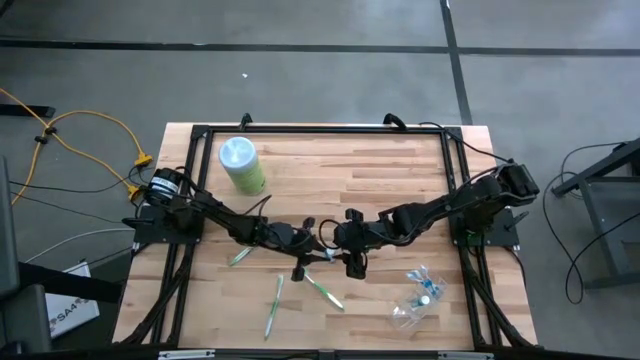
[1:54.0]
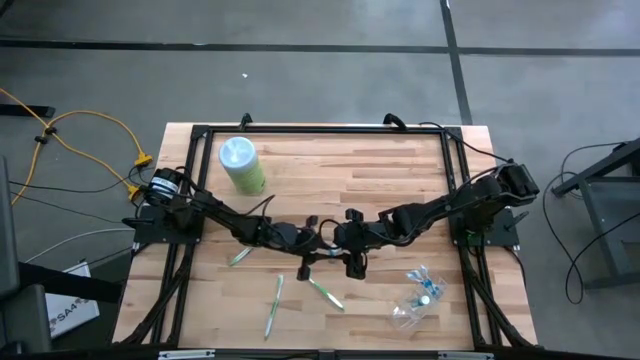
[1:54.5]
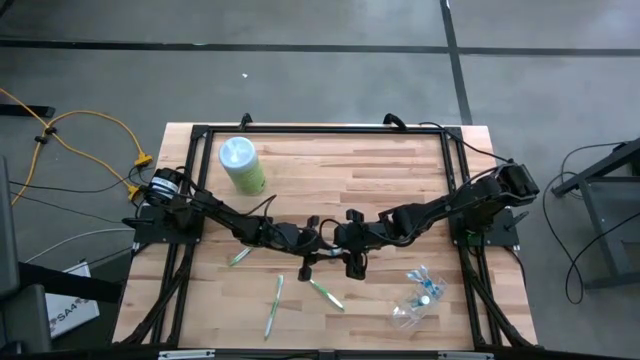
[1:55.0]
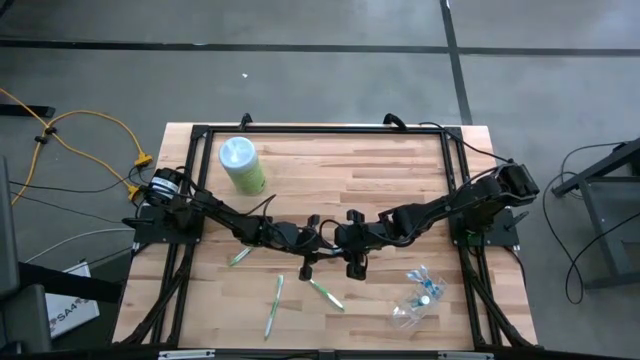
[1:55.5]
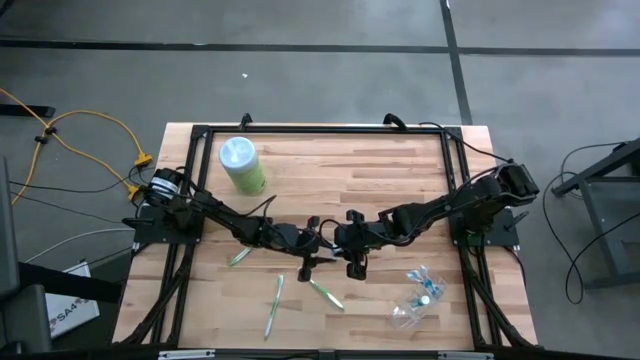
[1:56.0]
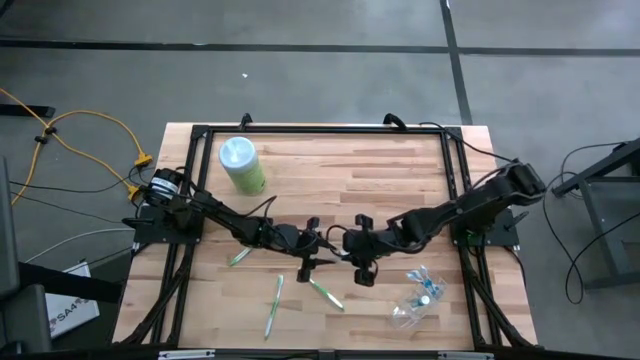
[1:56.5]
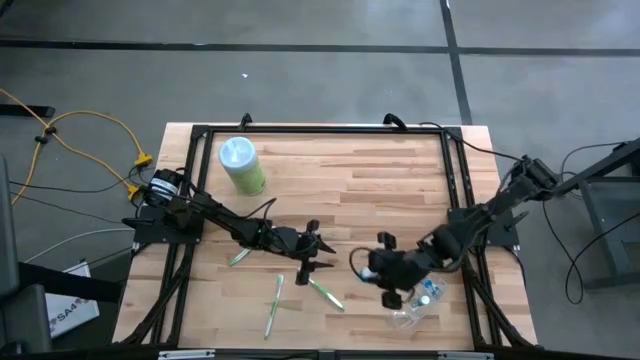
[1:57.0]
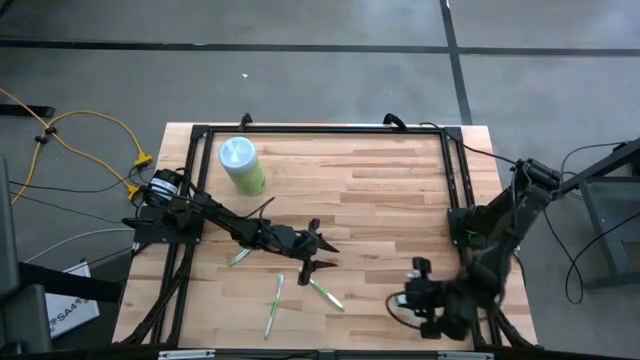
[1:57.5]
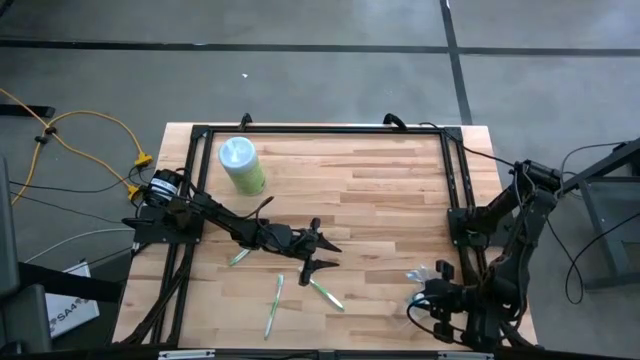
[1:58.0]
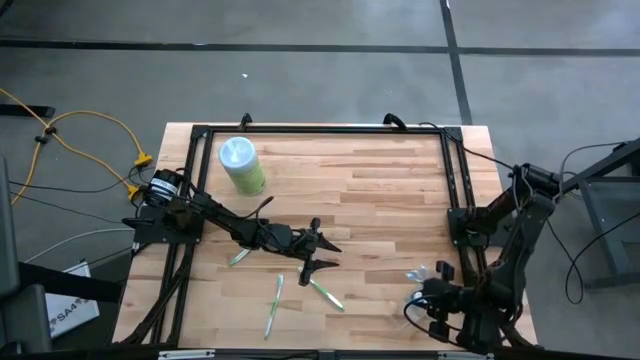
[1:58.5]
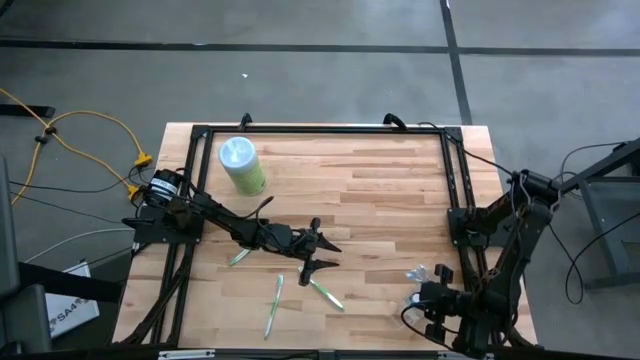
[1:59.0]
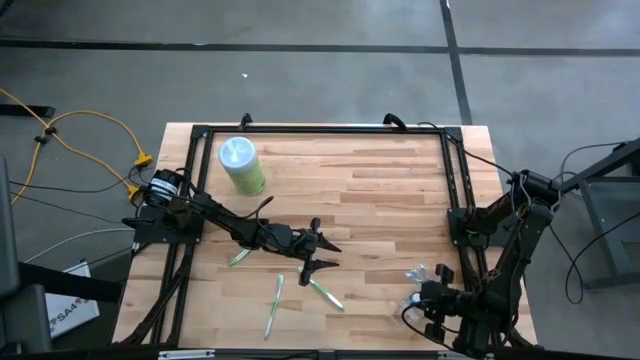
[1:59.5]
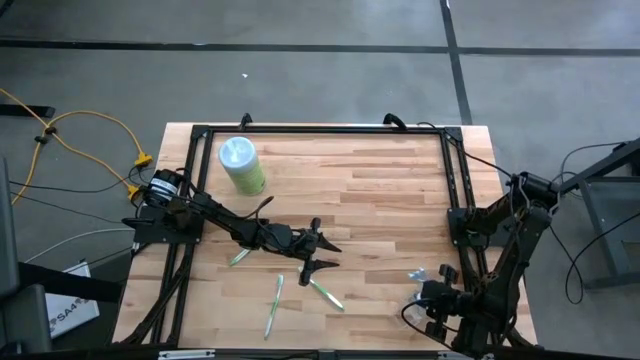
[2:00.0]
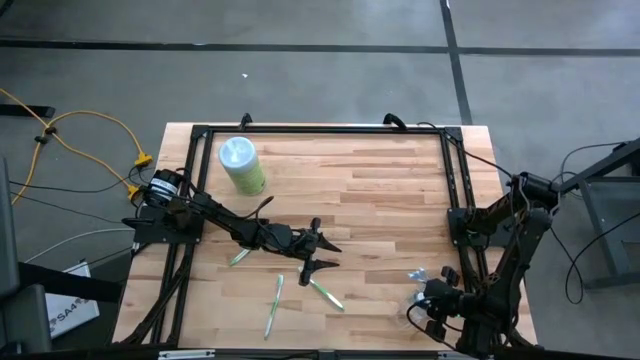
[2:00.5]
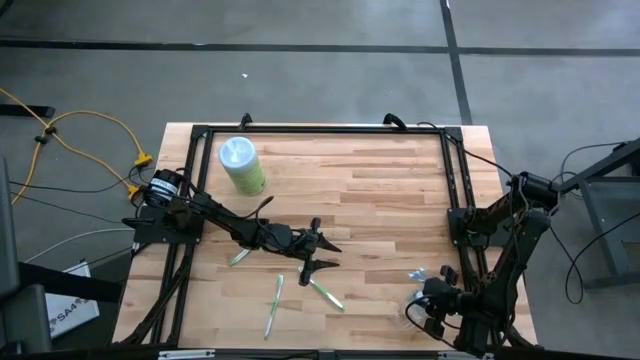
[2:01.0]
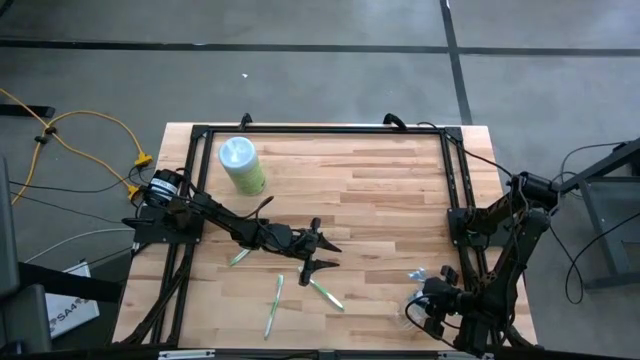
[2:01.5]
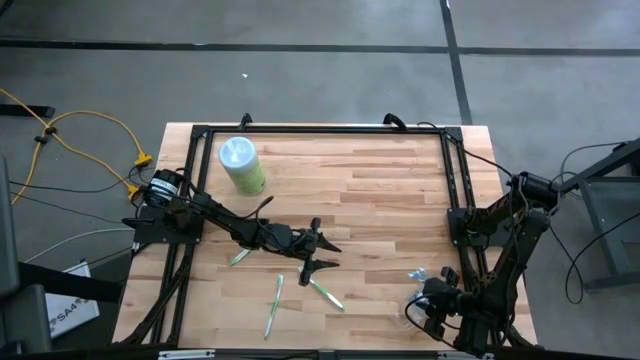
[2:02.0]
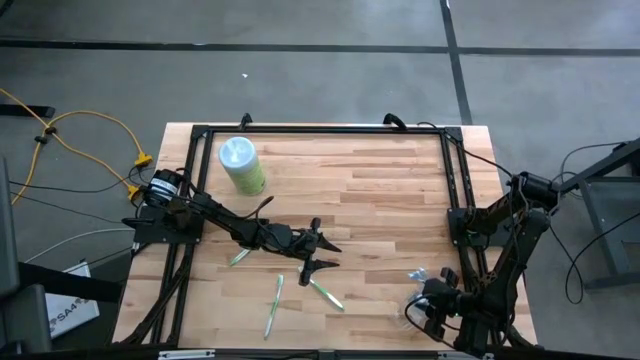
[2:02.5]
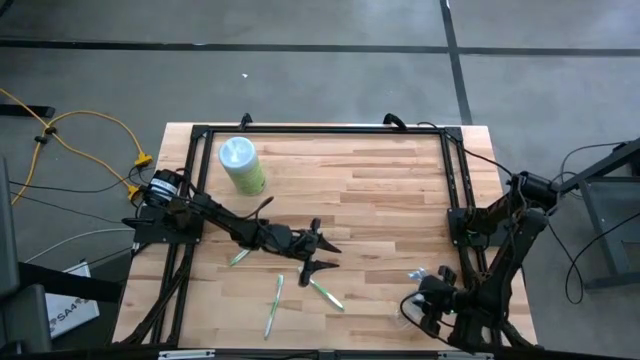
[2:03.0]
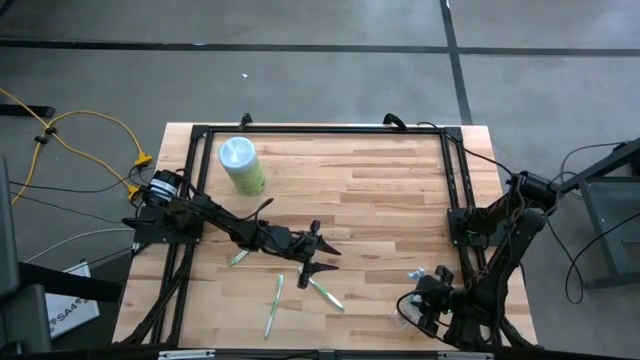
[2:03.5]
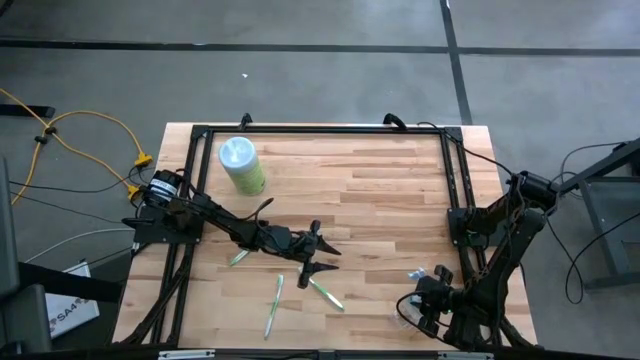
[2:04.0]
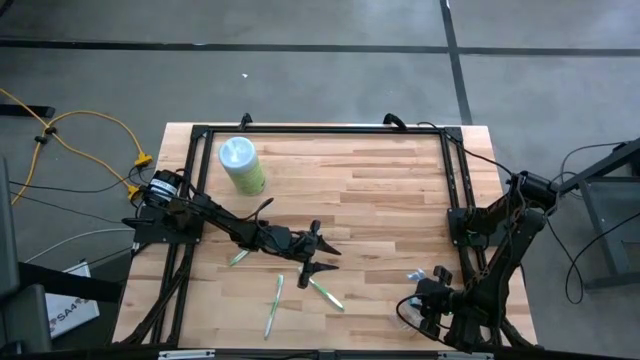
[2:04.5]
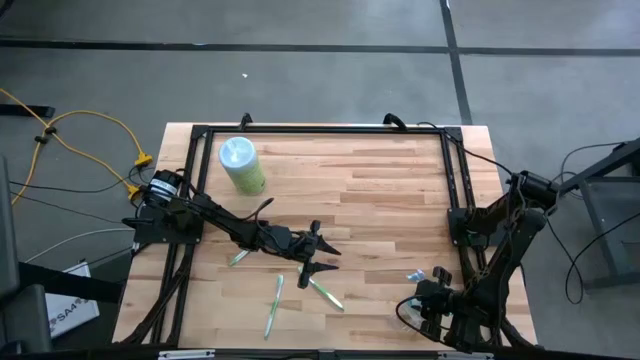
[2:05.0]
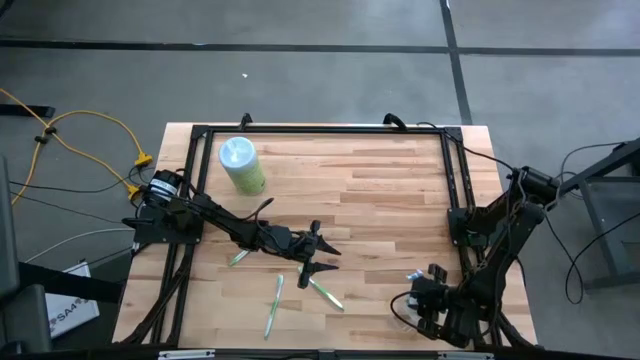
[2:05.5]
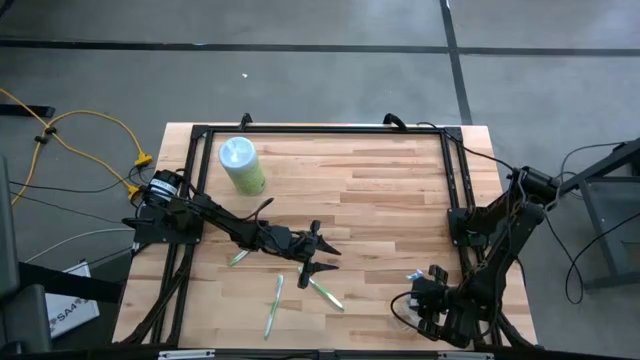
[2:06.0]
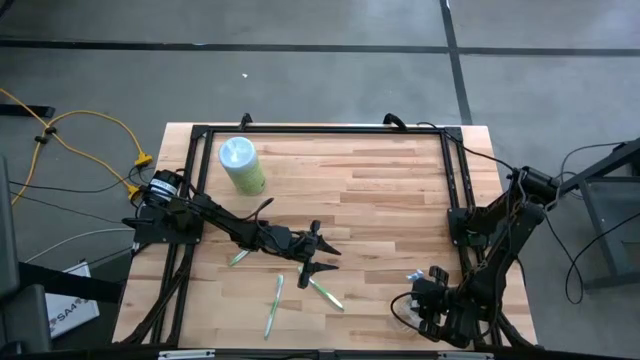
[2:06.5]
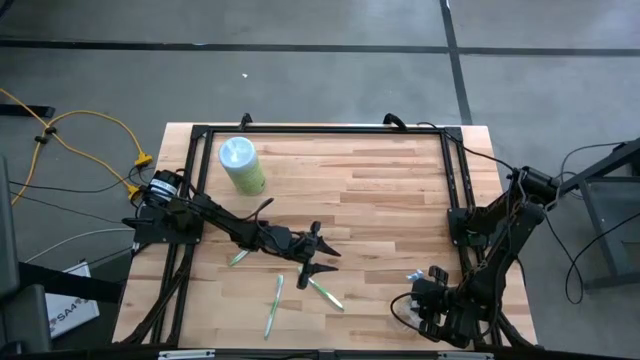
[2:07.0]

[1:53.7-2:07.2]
Task: Pick & Place toothbrushing station
Put the blue mouthwash bottle into the middle section of the transparent organizer

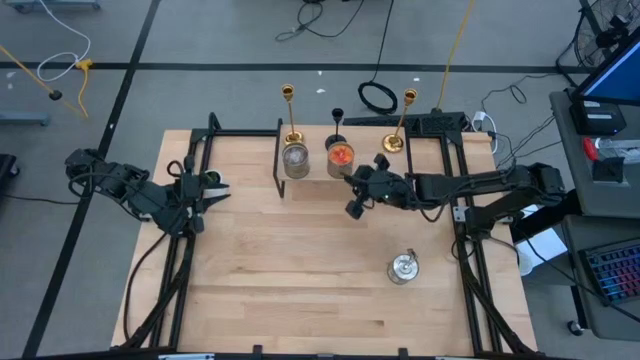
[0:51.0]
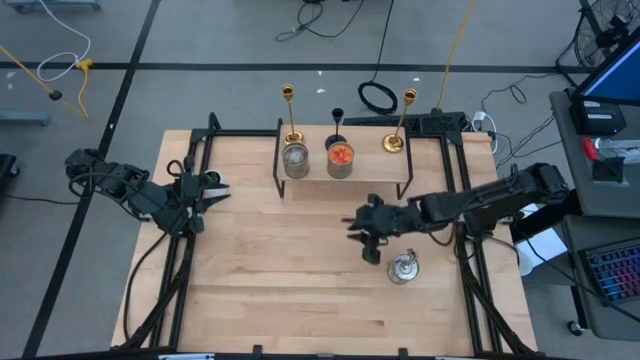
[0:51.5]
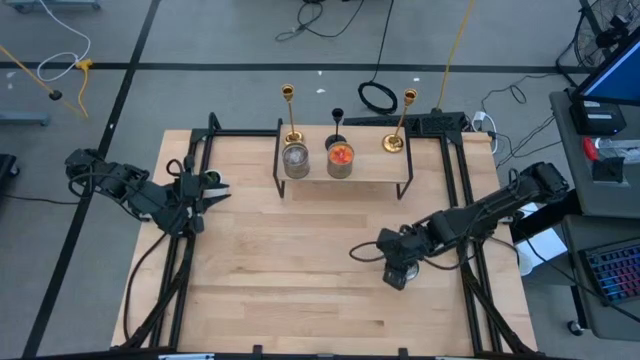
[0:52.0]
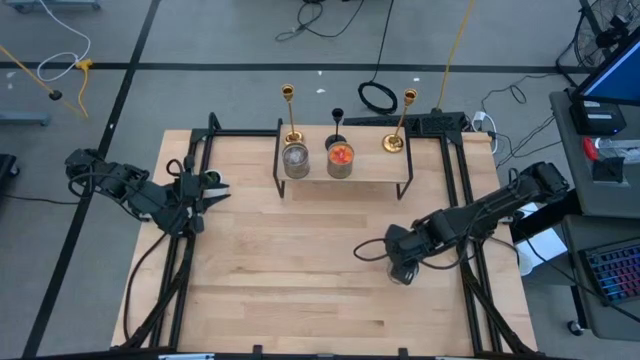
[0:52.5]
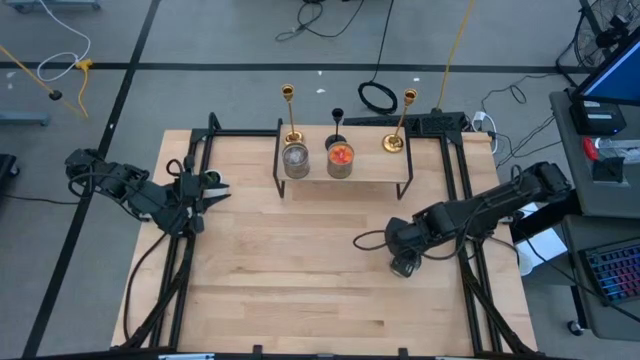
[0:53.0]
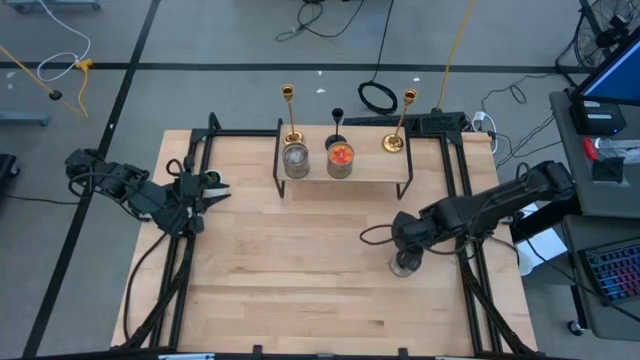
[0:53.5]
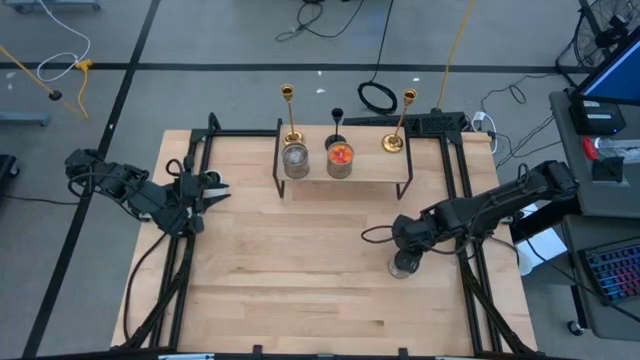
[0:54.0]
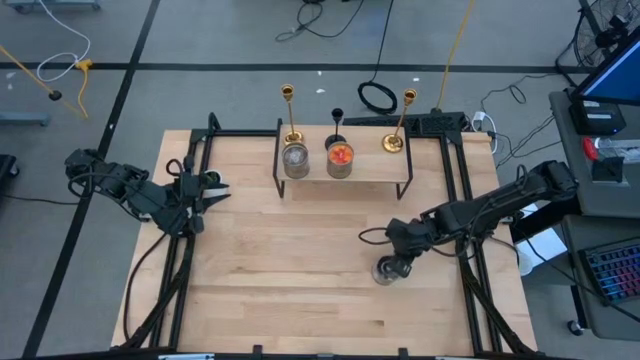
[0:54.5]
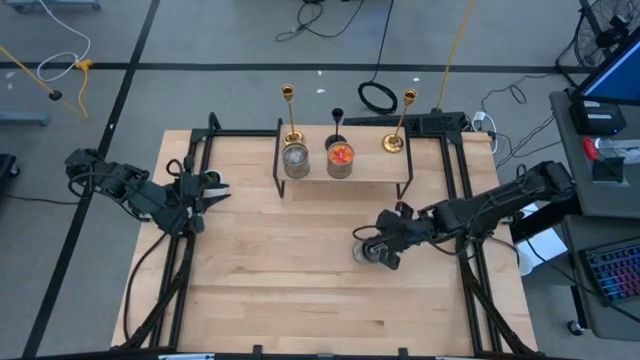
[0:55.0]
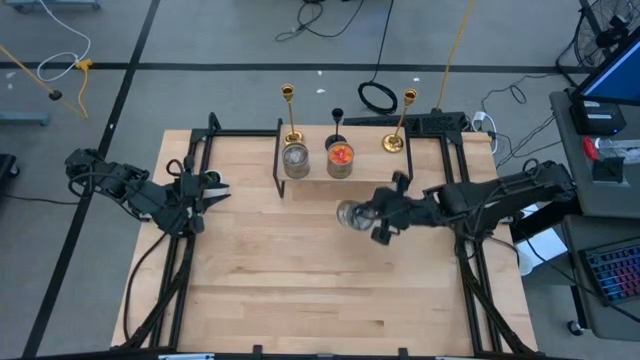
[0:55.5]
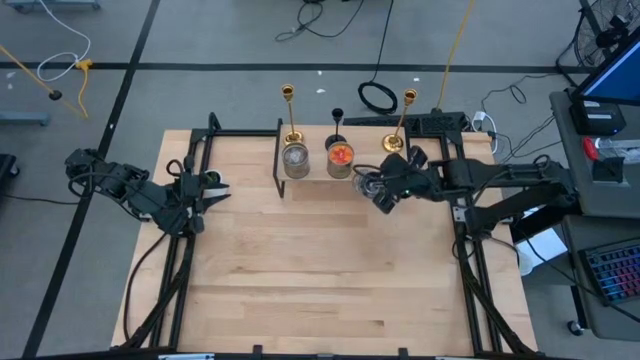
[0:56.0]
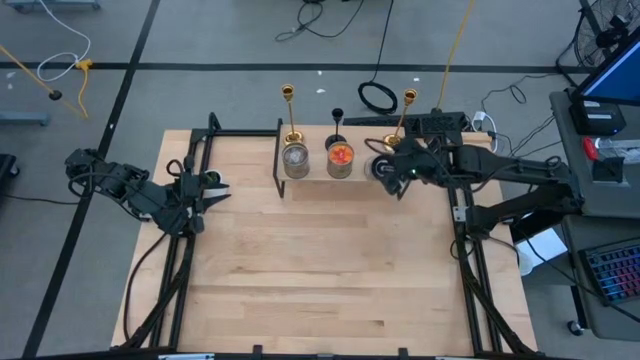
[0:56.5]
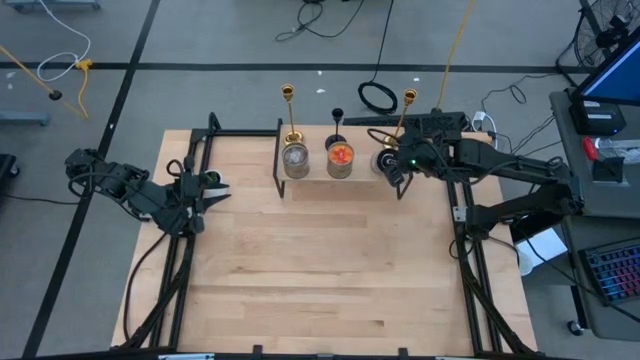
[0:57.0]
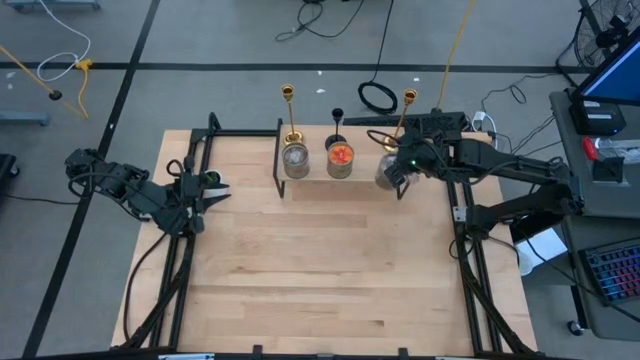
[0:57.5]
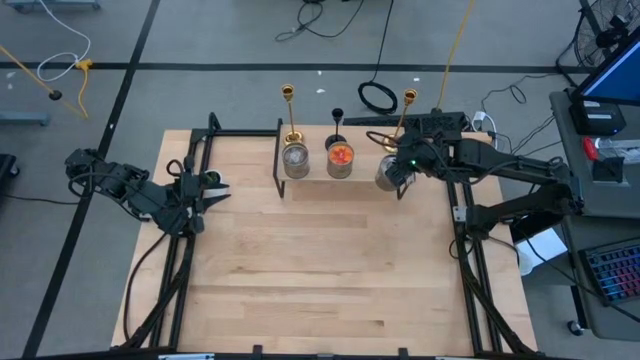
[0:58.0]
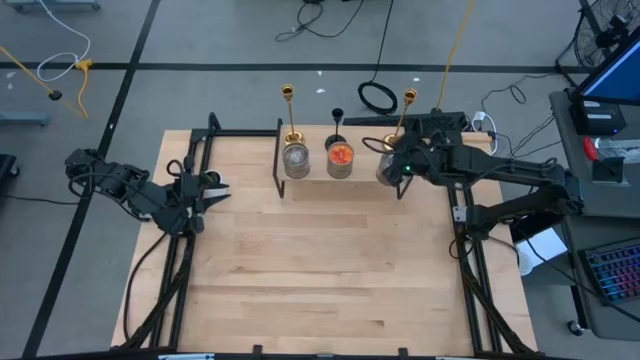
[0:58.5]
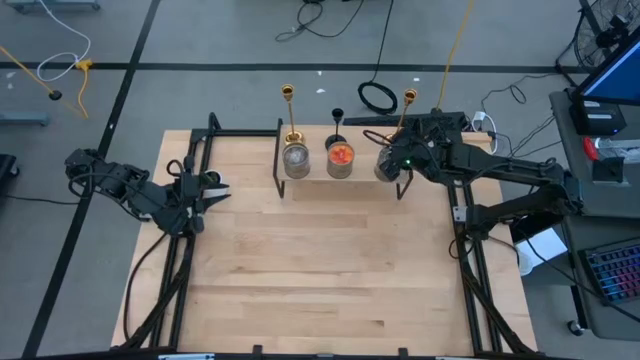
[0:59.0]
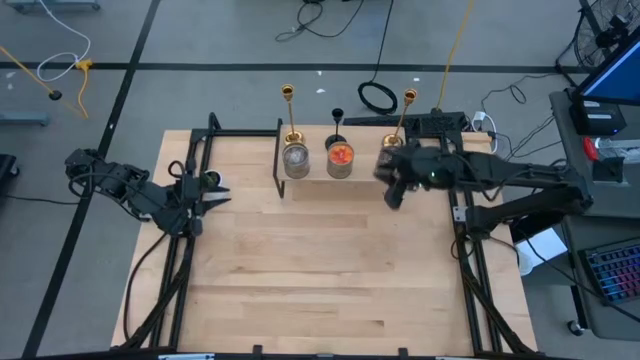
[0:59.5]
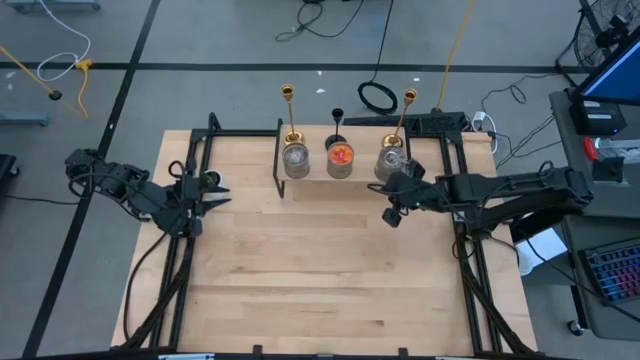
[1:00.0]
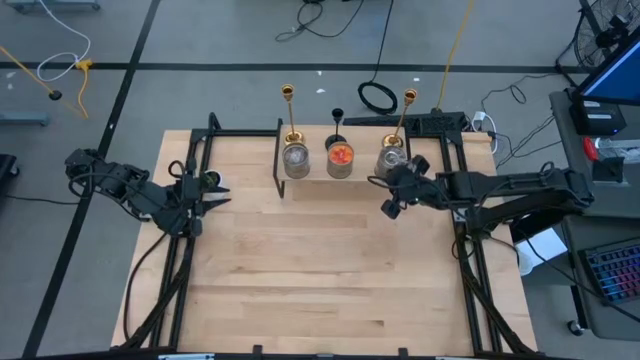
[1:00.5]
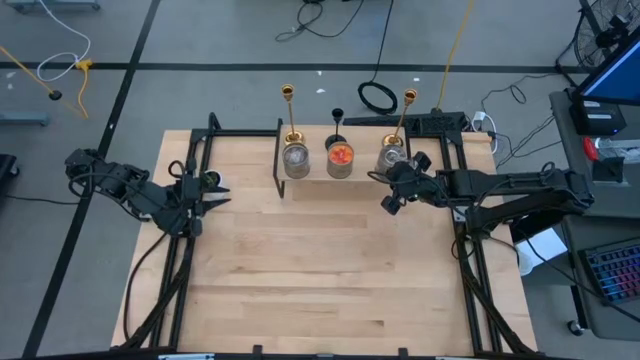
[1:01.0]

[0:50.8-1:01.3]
Task: Pick & Place candle stick holders
Put the brown scented candle aligned with the golden candle holder on the shelf
